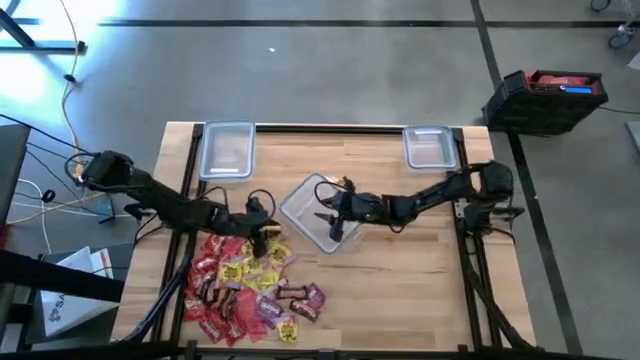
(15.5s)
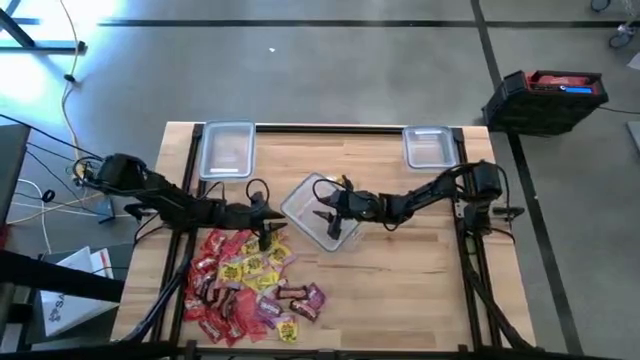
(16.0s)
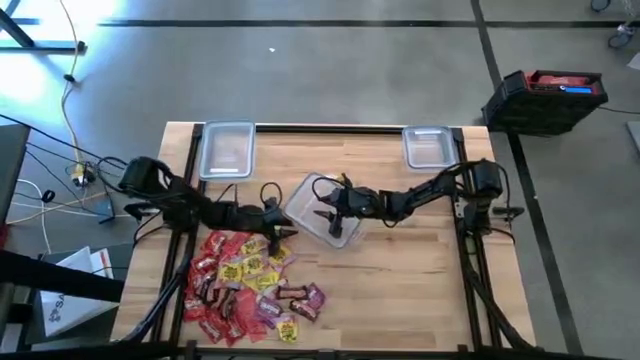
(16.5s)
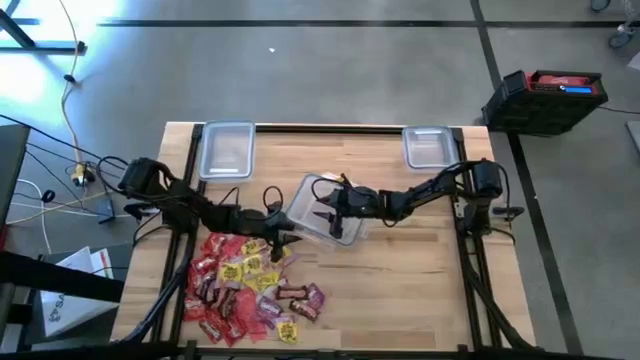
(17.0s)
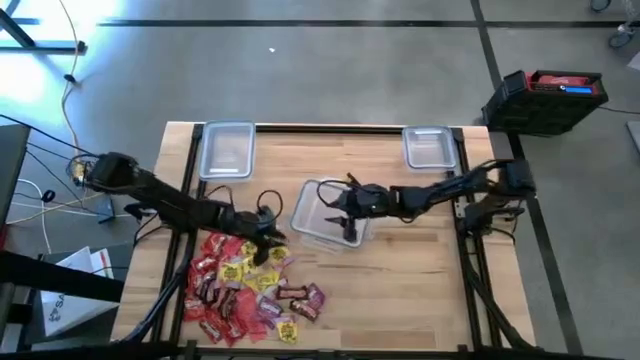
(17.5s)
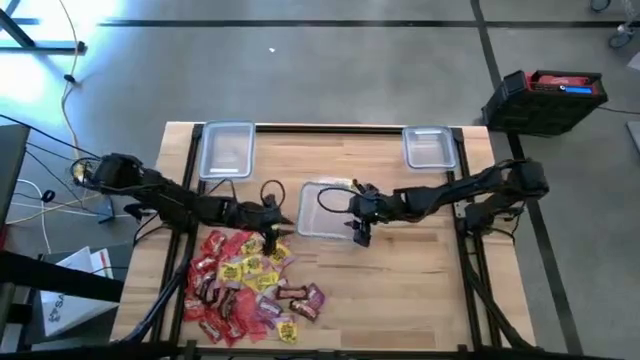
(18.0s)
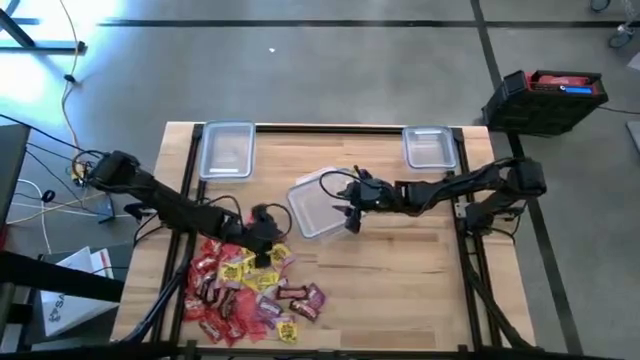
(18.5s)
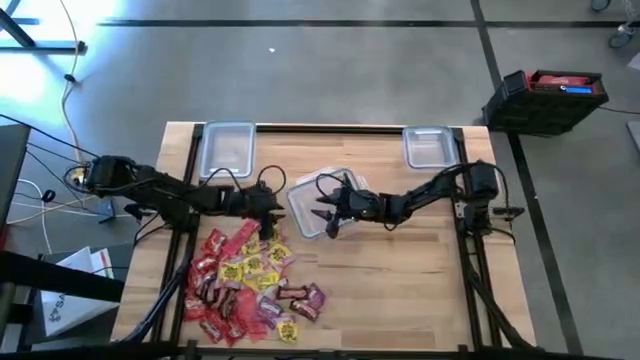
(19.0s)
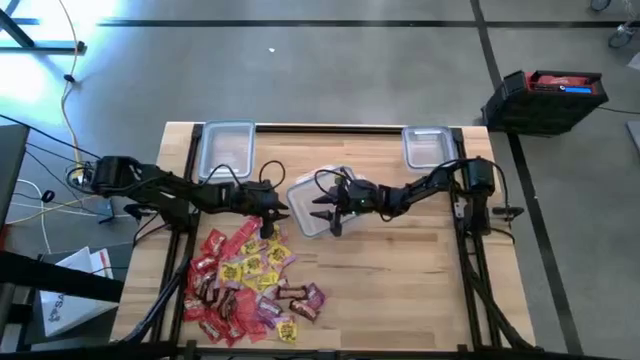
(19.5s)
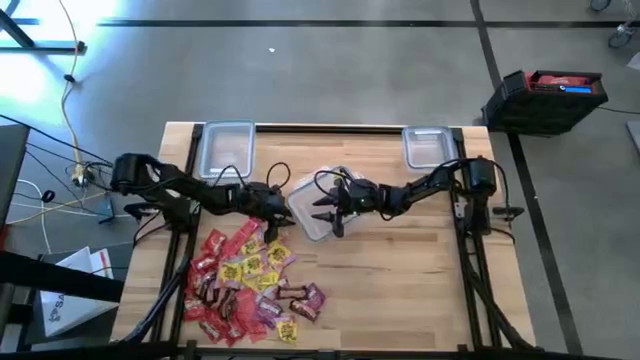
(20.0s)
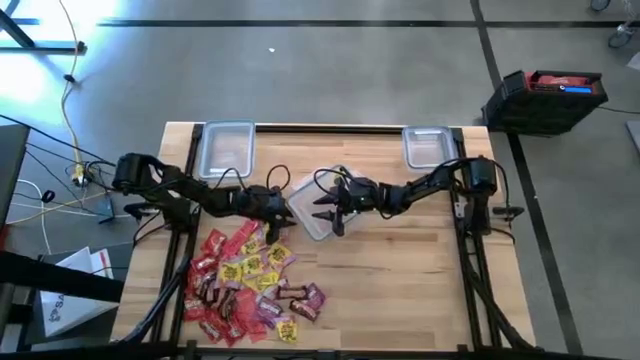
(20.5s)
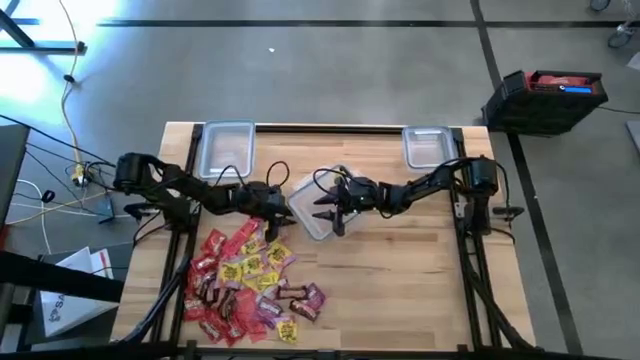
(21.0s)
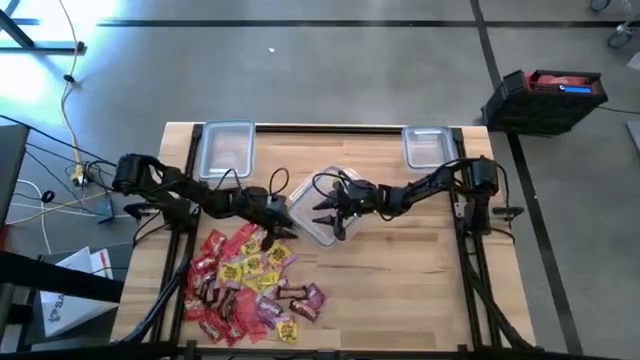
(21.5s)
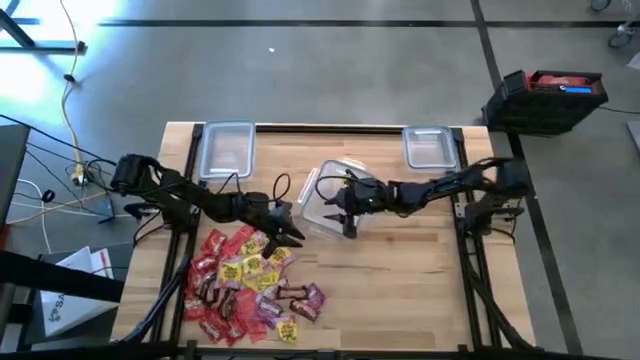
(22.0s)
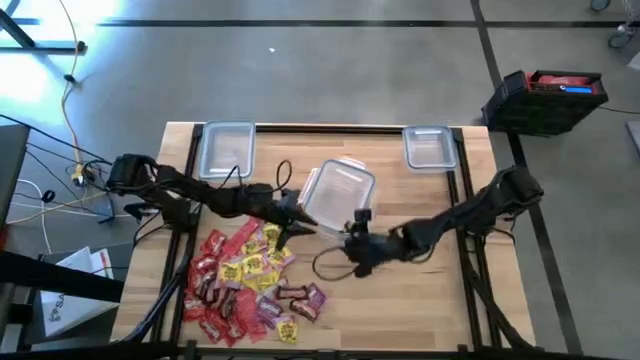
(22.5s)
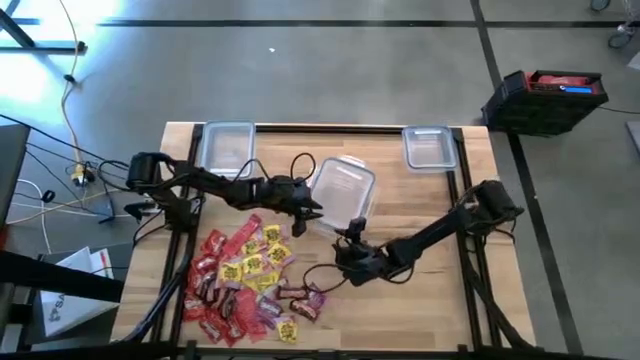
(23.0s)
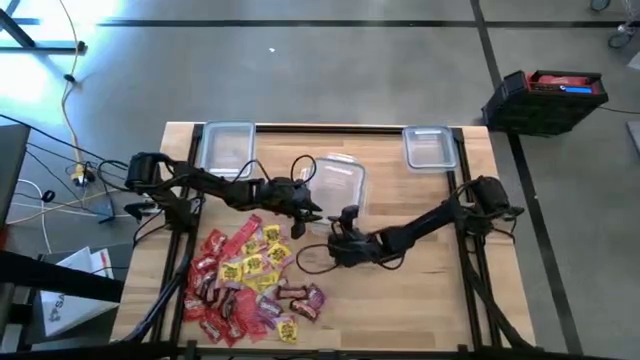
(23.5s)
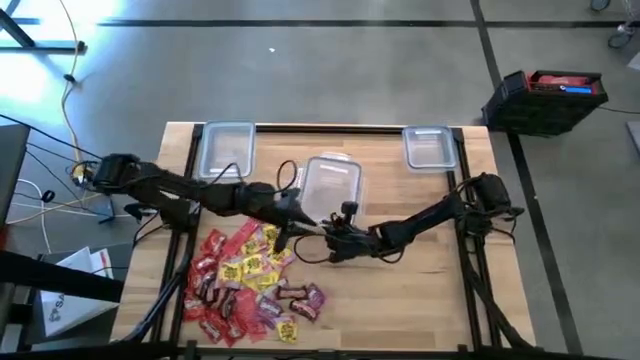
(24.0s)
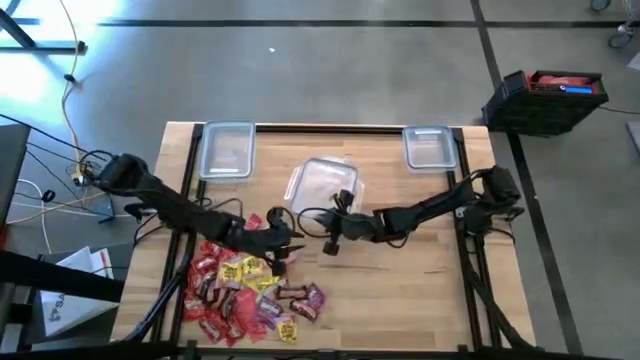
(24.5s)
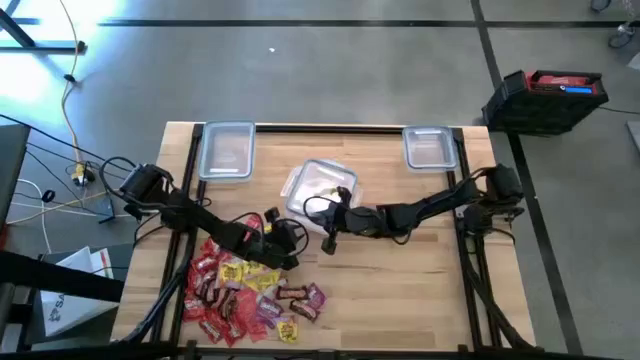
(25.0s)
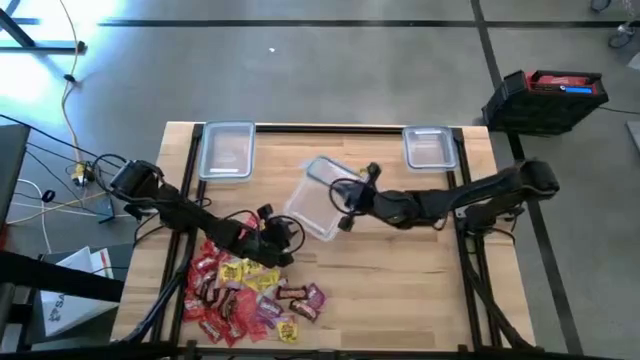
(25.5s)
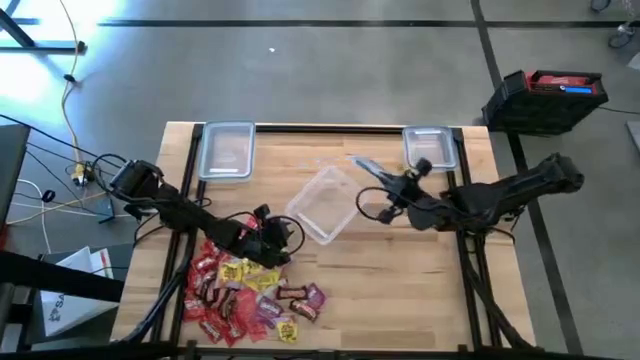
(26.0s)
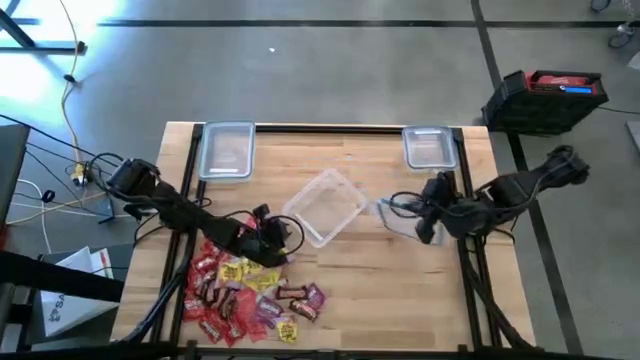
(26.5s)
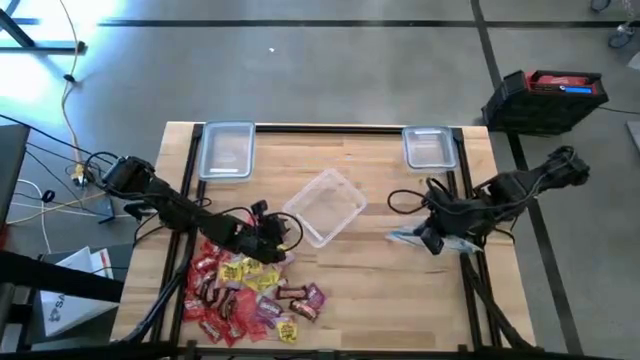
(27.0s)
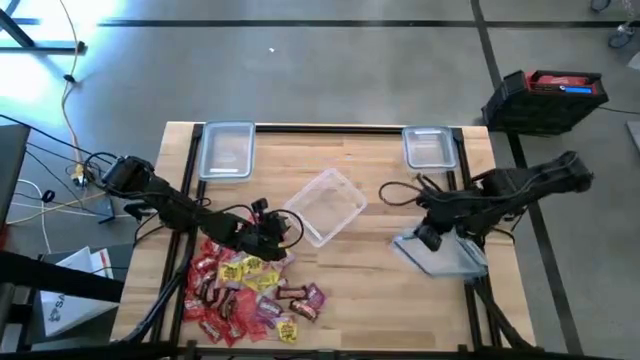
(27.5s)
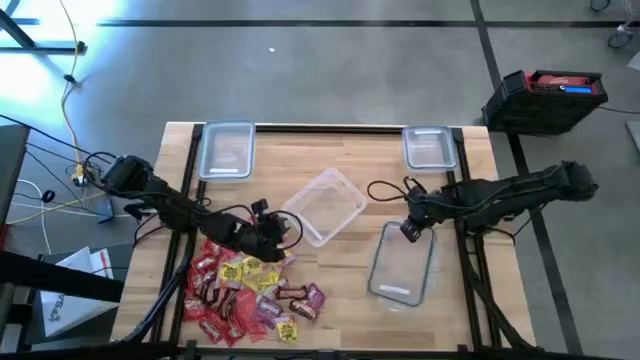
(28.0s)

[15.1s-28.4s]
Task: Sort candy
Open the transparent bin

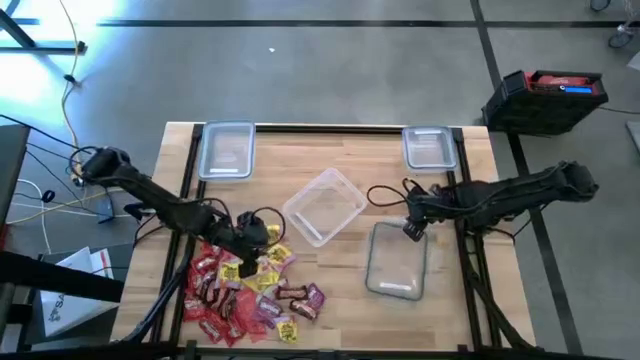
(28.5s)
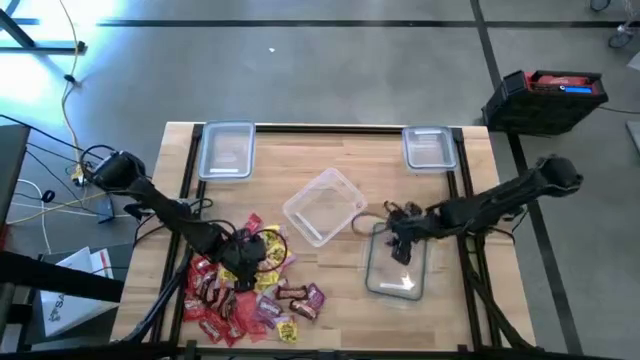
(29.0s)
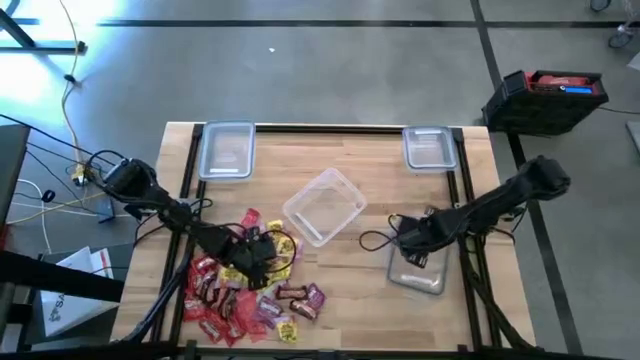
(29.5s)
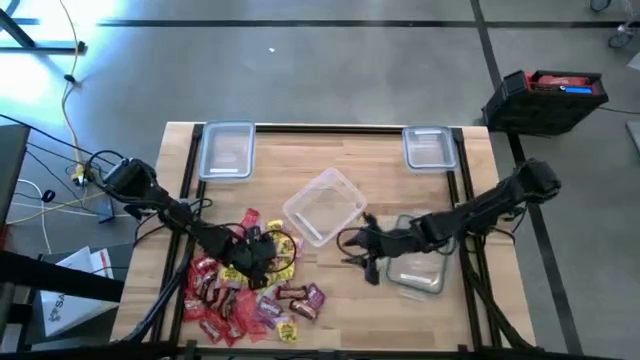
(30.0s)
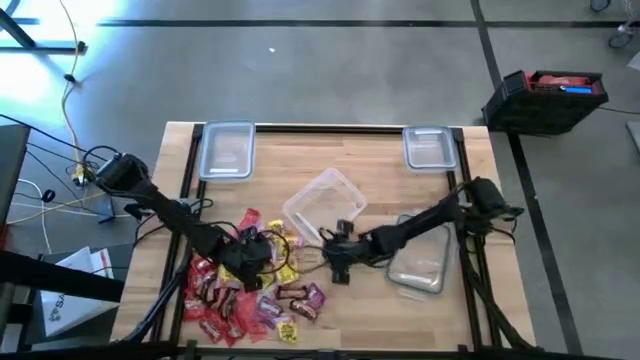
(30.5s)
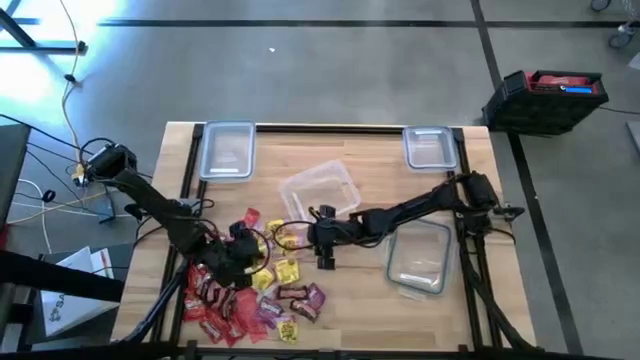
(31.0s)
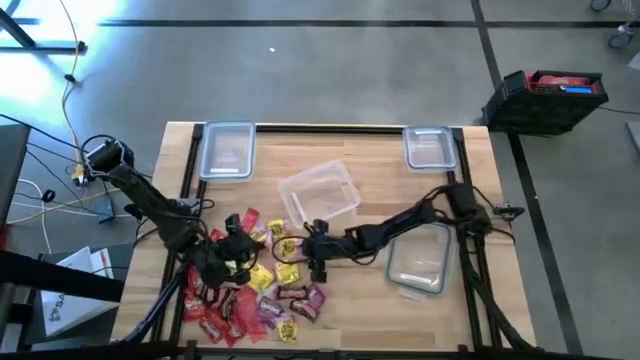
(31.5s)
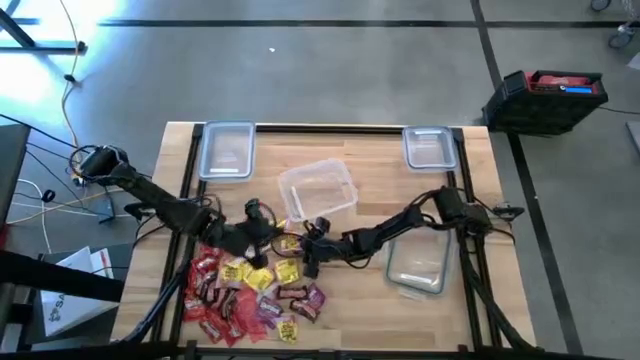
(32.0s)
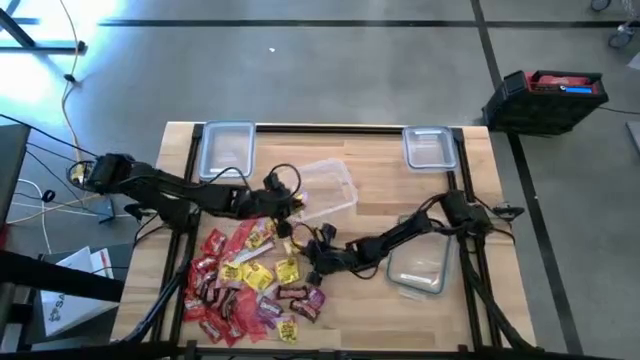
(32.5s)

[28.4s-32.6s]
Put the yellow candy into the center transparent bin

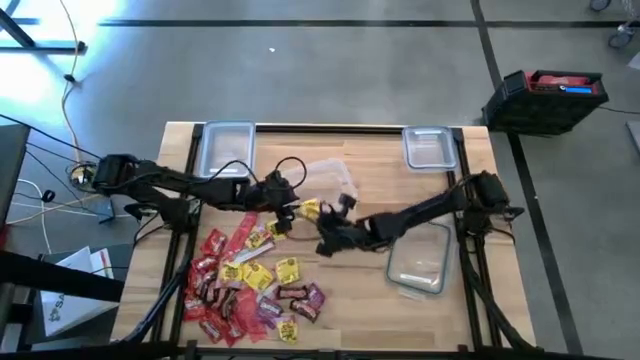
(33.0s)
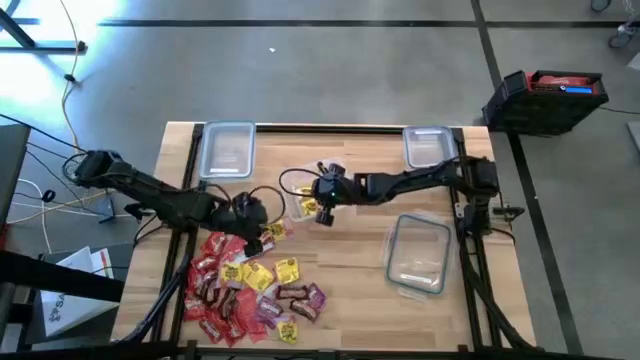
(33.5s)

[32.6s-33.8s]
Put the yellow candy into the center transparent bin

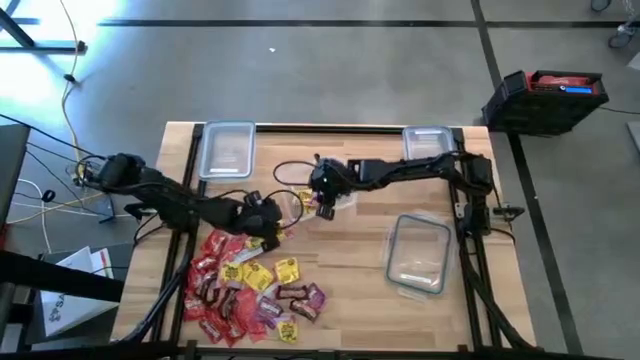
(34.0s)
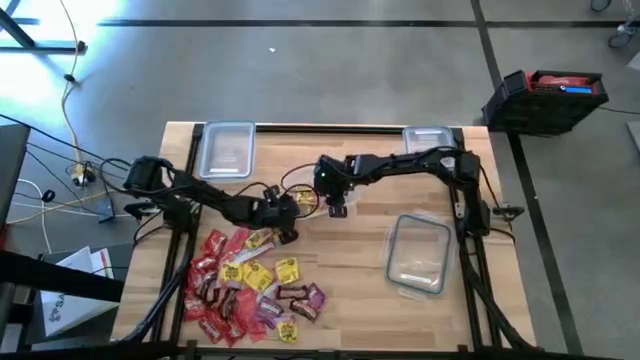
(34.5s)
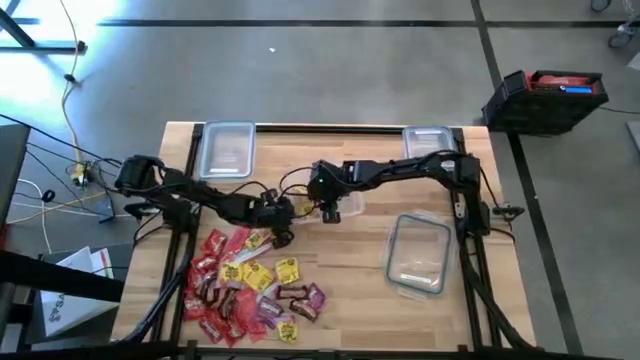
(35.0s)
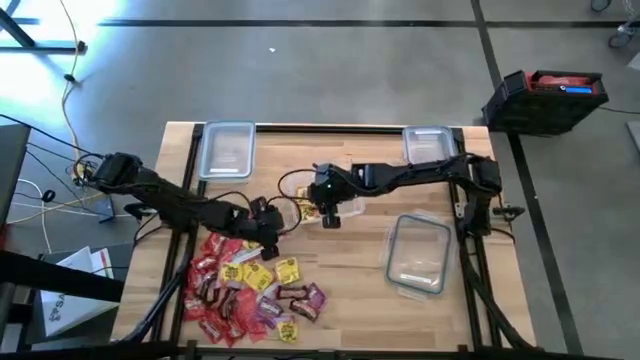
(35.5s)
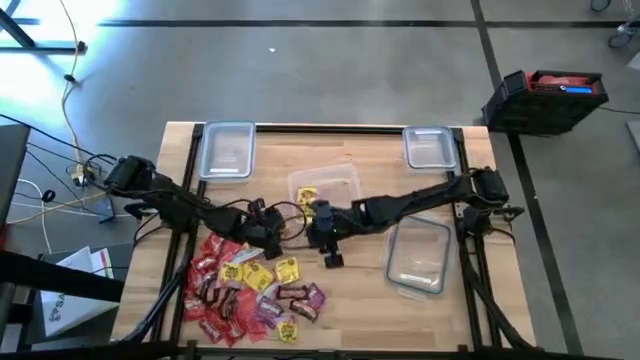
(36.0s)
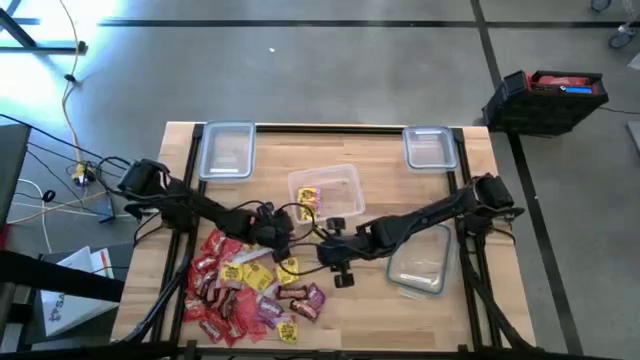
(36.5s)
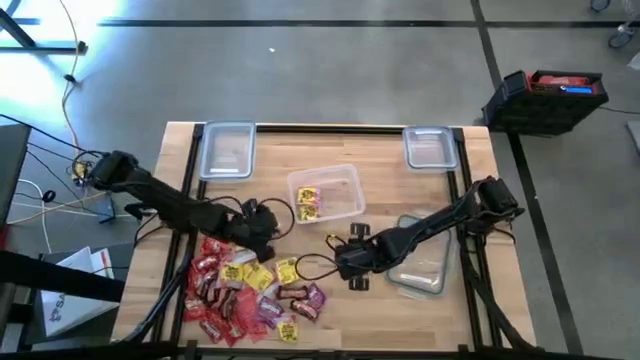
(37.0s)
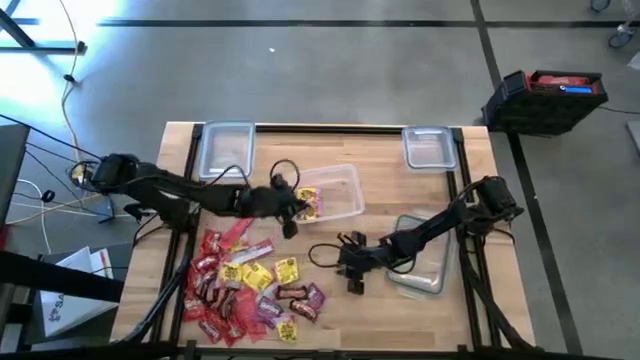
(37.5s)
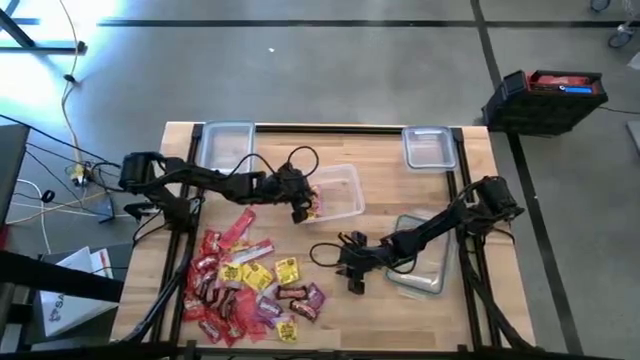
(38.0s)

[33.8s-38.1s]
Put the yellow candy into the center transparent bin
